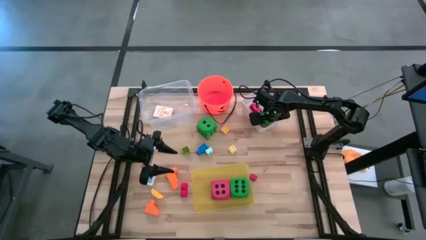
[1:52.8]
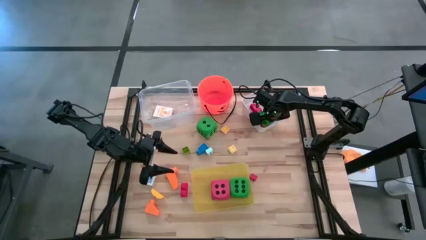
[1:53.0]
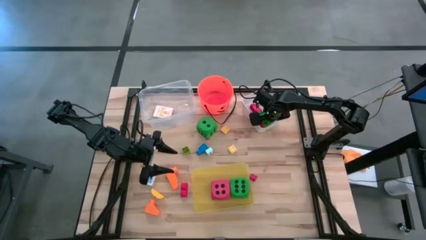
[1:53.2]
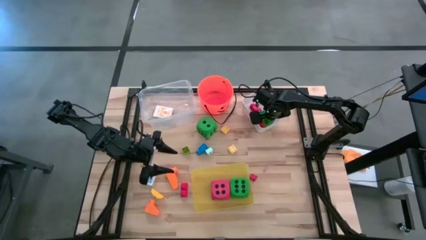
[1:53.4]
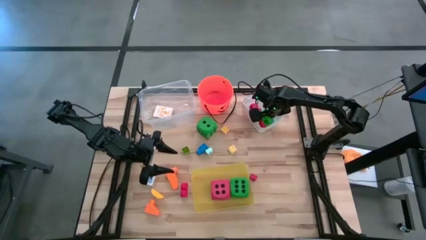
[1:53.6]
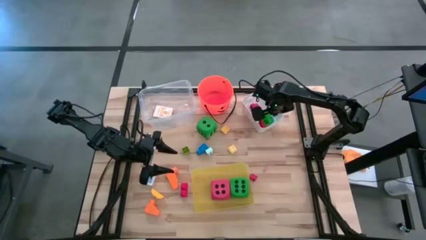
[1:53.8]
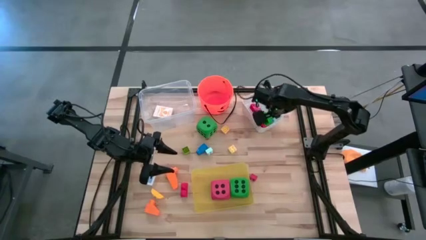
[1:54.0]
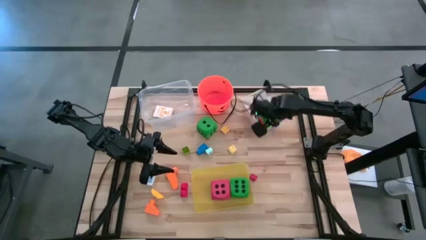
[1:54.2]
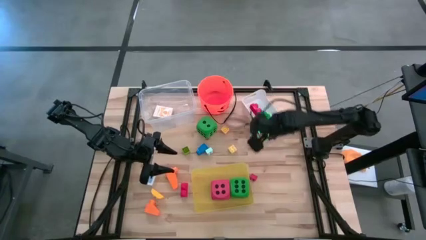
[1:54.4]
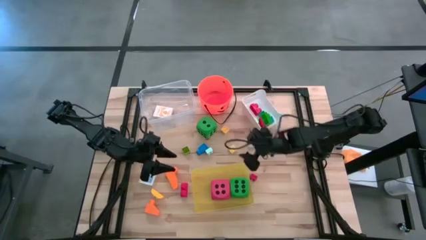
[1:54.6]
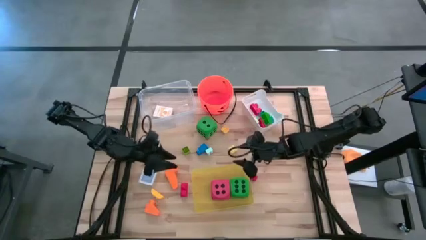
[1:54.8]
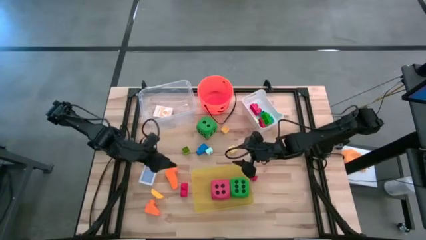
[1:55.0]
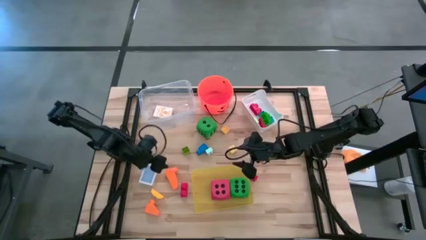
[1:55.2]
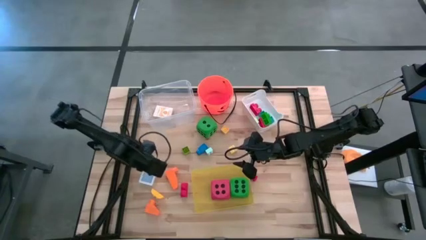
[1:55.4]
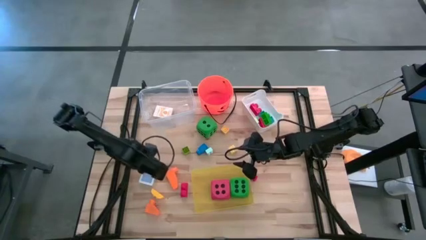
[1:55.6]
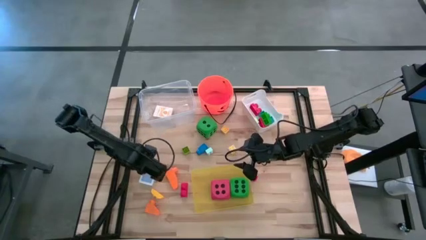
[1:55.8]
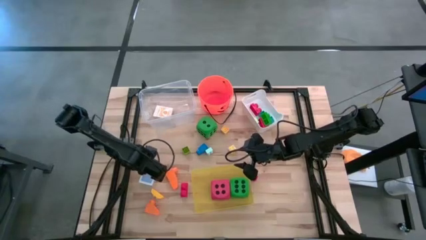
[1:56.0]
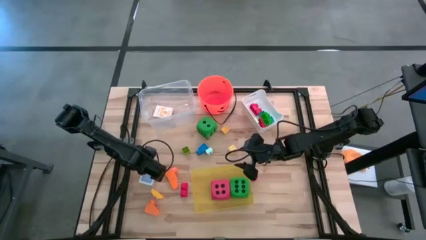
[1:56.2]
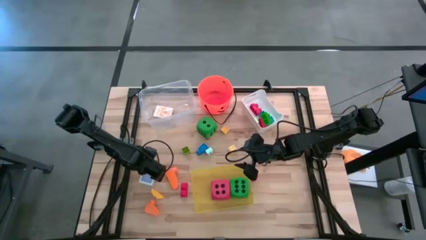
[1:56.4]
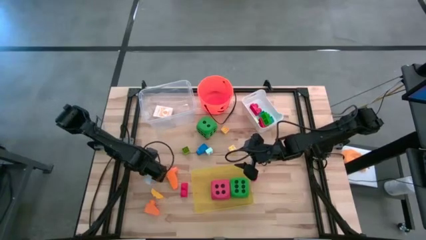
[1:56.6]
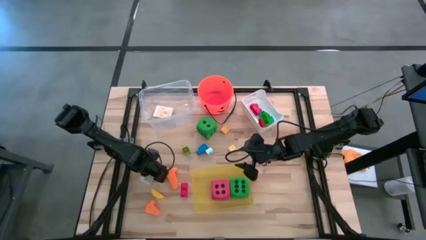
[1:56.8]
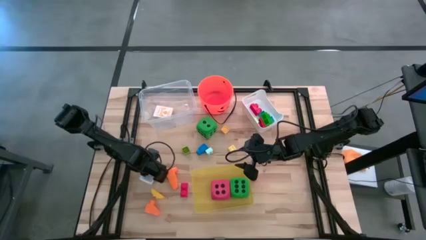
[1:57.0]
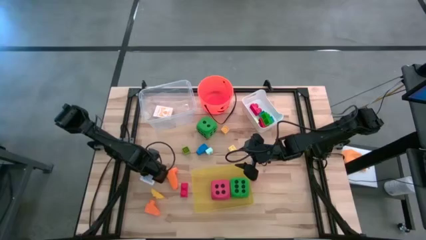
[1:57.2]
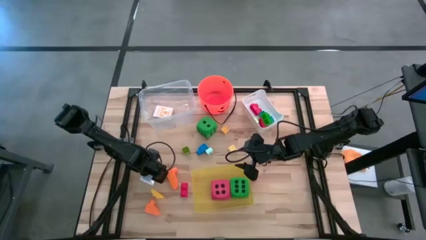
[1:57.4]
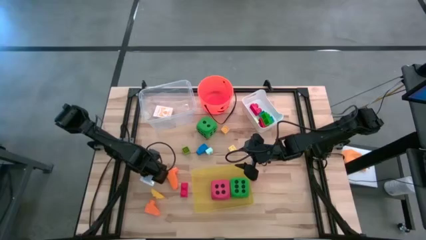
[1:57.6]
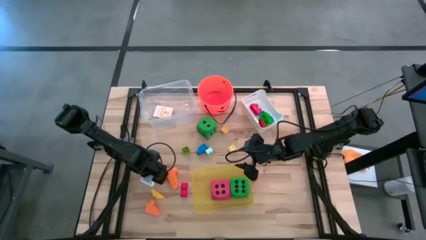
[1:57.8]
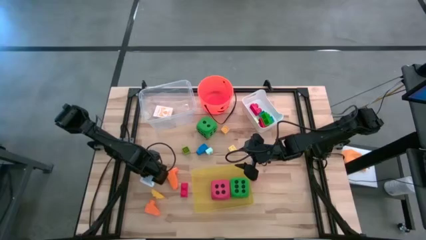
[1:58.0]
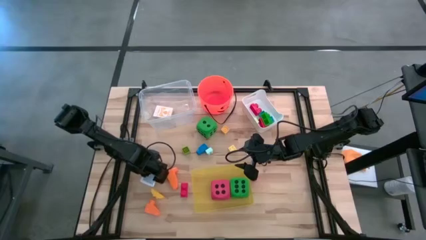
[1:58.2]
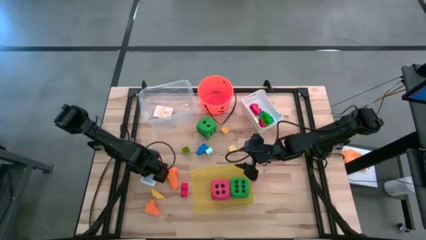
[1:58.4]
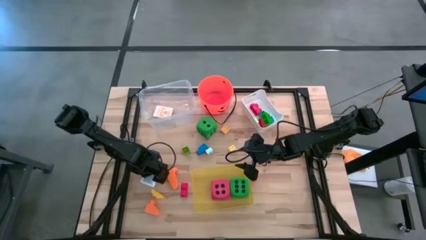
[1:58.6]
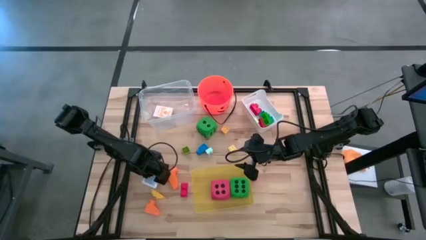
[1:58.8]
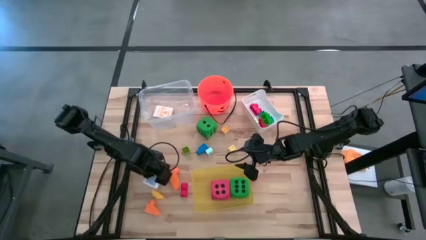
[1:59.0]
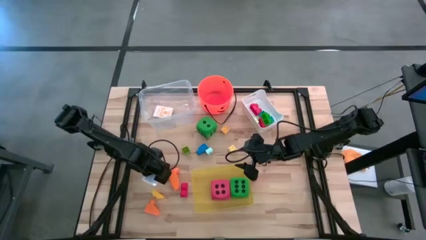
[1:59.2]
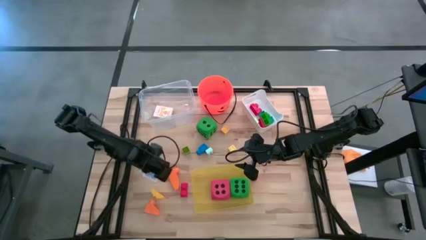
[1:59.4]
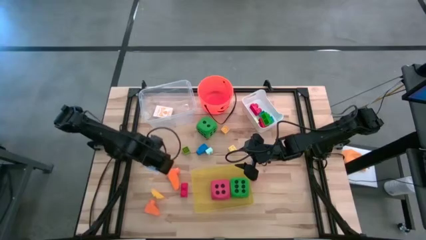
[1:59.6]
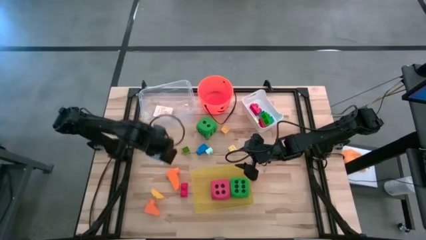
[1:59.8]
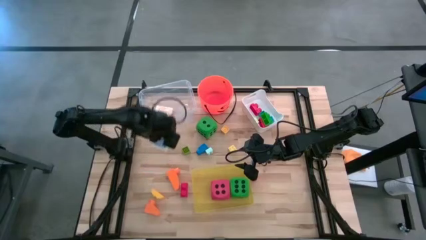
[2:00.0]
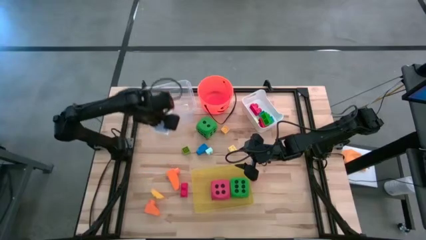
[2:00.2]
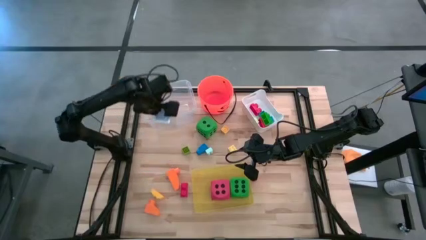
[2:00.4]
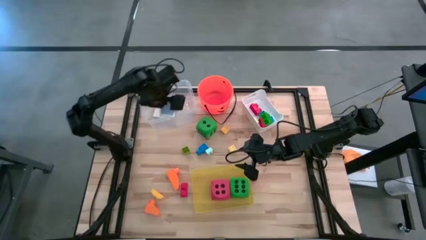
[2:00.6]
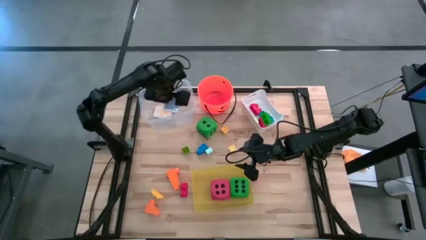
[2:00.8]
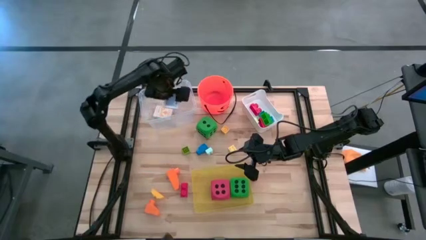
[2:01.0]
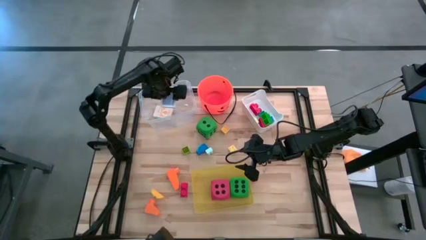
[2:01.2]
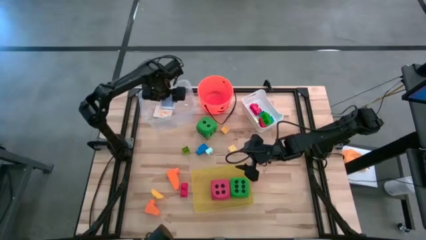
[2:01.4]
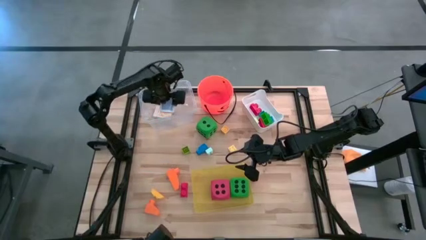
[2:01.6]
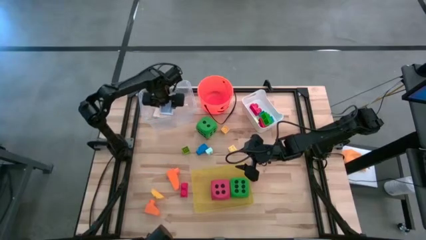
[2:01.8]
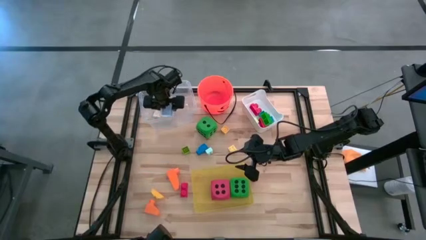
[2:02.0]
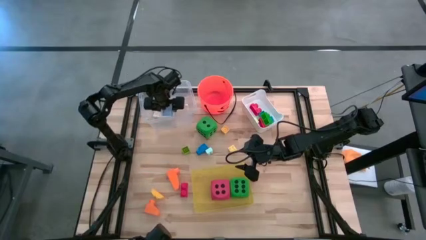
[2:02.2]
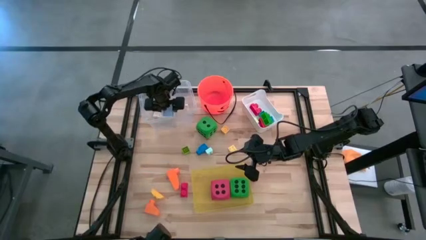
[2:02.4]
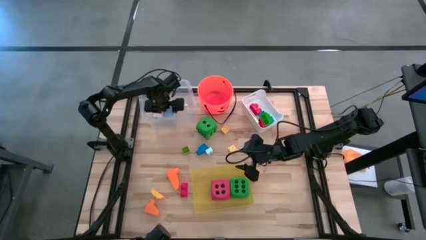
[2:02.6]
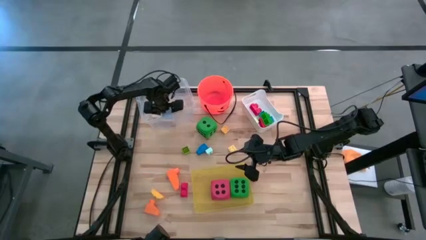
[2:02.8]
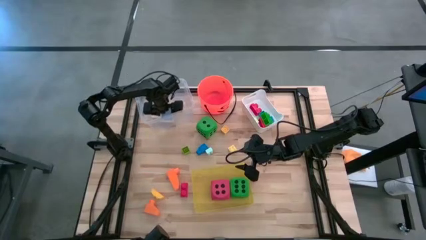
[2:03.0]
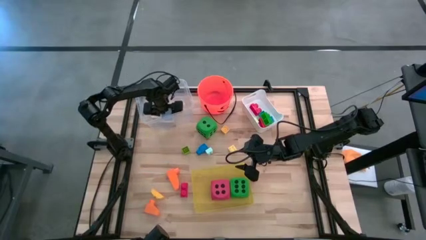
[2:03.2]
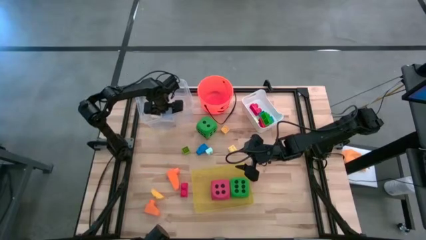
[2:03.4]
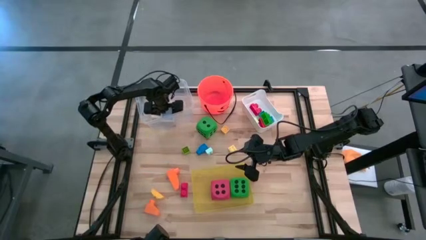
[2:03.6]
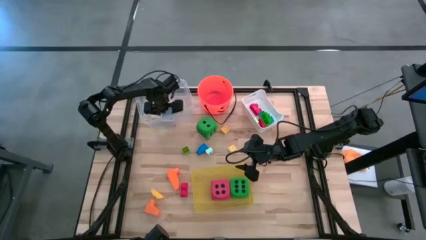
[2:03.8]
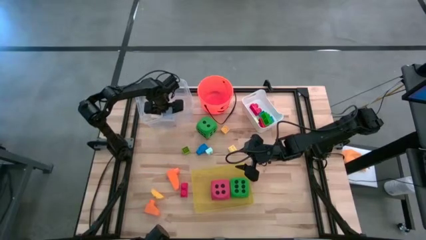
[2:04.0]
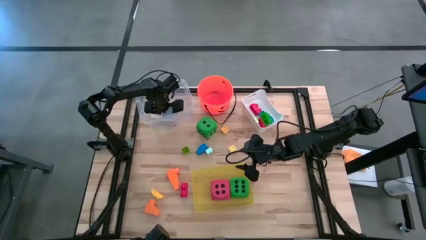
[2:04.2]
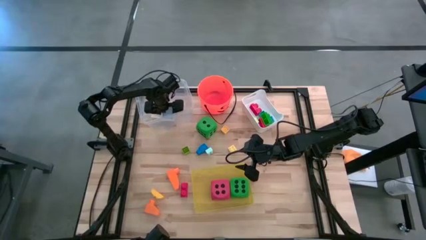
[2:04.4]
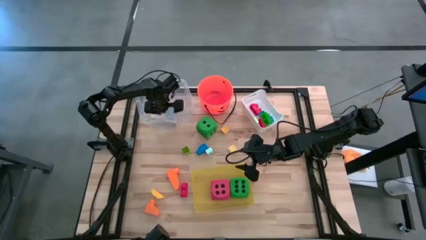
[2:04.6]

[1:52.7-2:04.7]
Task: Pick & Place Toys
Put the blue playing card box into the transparent bin

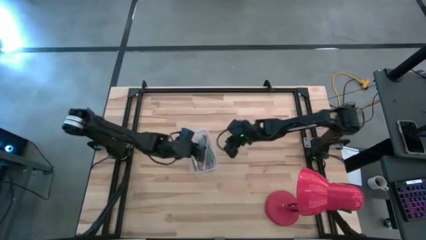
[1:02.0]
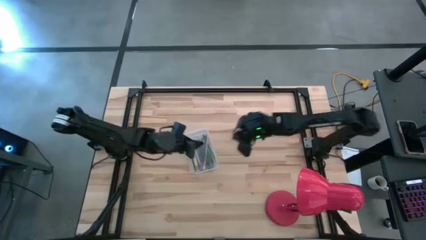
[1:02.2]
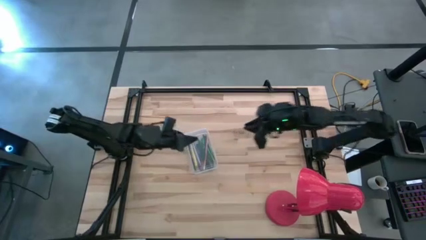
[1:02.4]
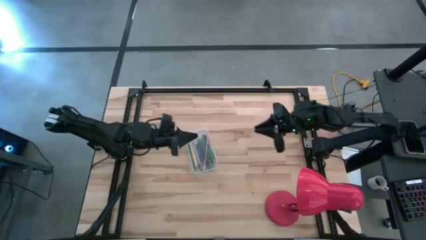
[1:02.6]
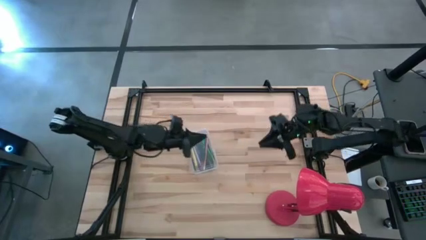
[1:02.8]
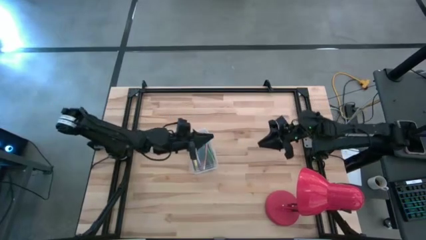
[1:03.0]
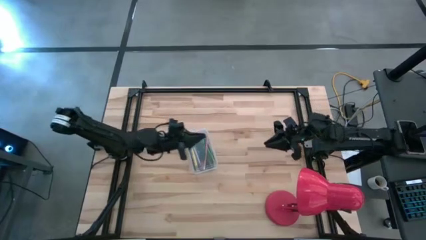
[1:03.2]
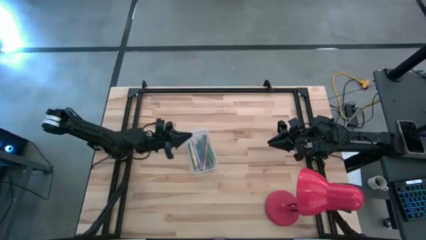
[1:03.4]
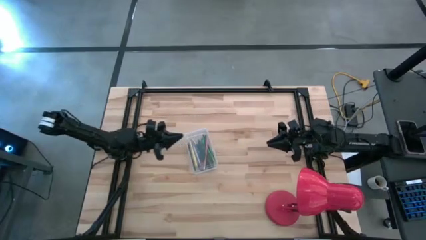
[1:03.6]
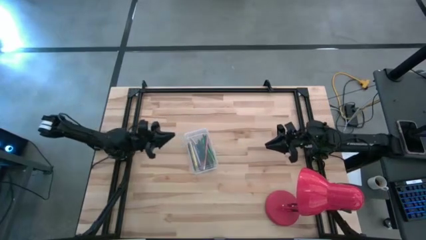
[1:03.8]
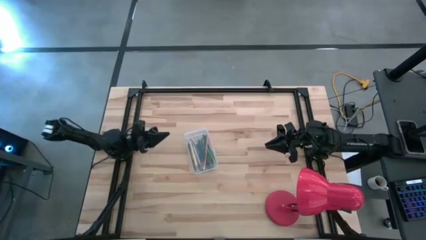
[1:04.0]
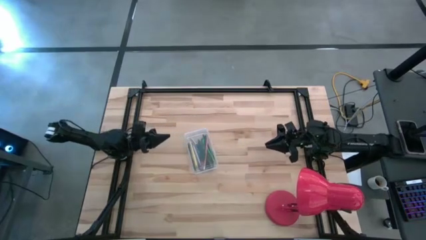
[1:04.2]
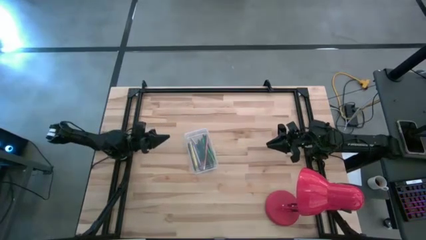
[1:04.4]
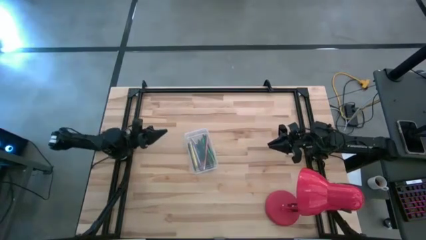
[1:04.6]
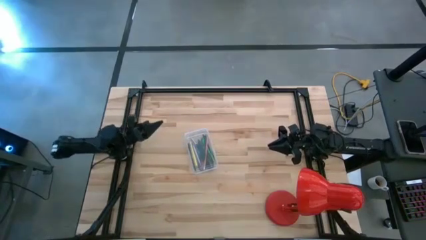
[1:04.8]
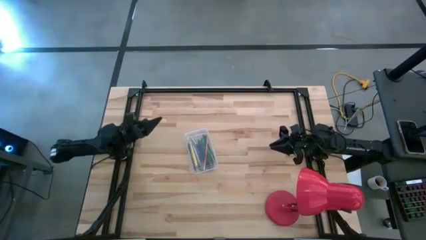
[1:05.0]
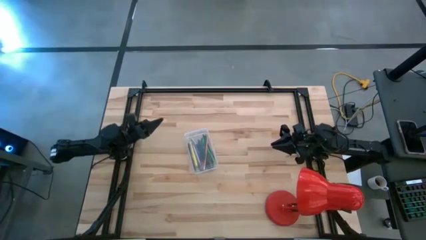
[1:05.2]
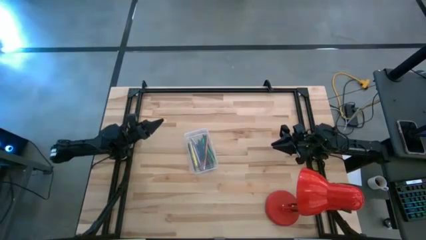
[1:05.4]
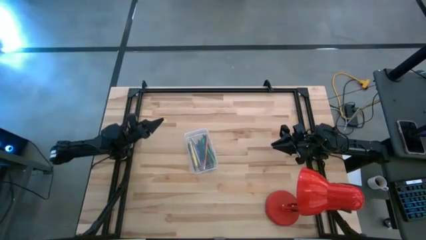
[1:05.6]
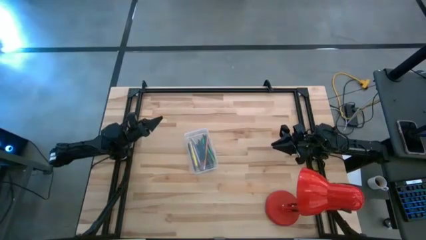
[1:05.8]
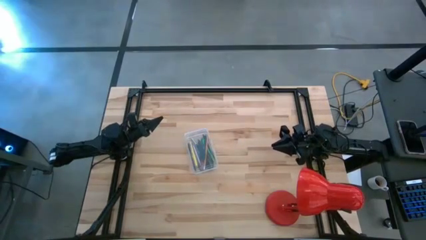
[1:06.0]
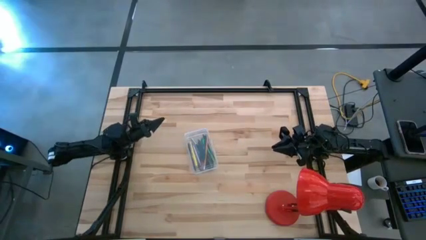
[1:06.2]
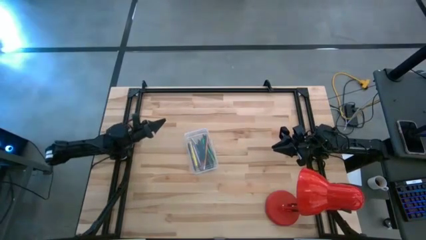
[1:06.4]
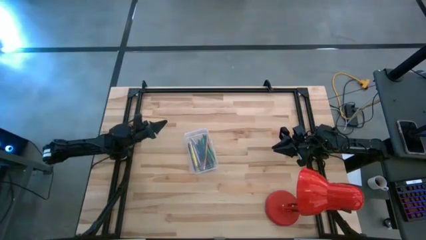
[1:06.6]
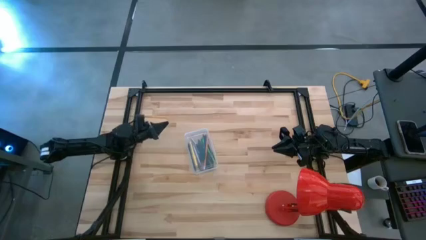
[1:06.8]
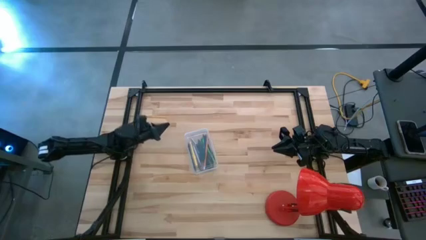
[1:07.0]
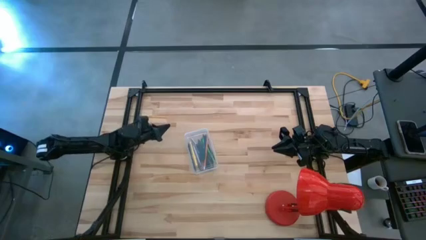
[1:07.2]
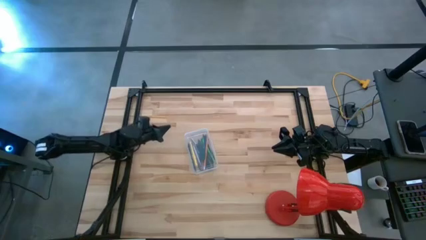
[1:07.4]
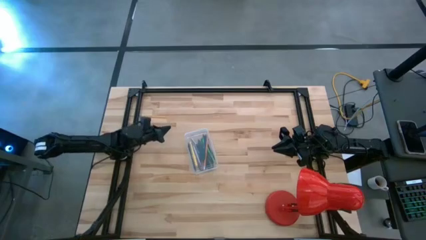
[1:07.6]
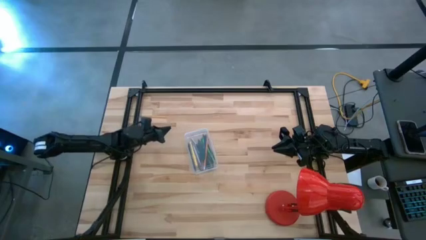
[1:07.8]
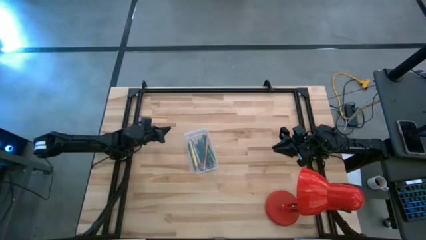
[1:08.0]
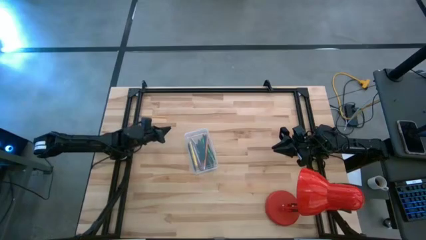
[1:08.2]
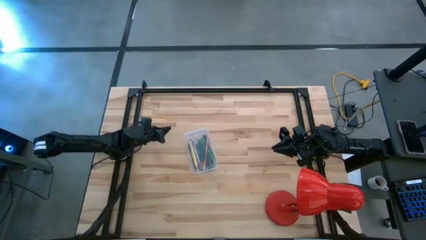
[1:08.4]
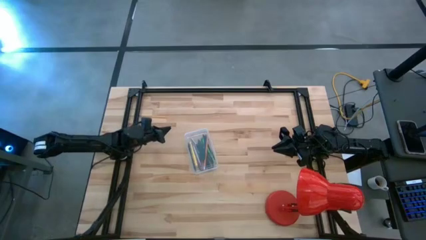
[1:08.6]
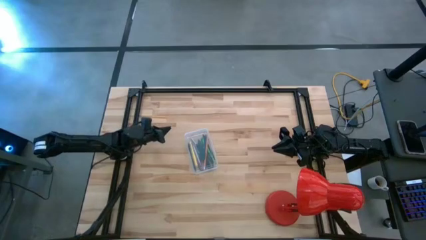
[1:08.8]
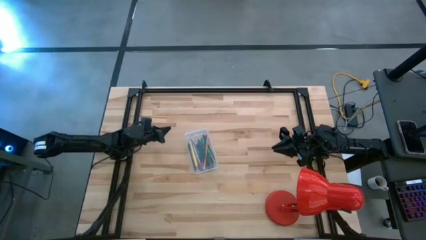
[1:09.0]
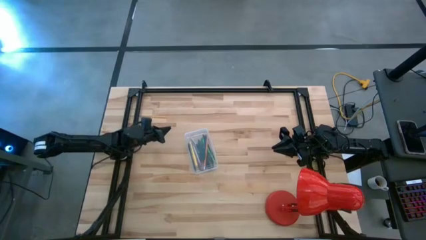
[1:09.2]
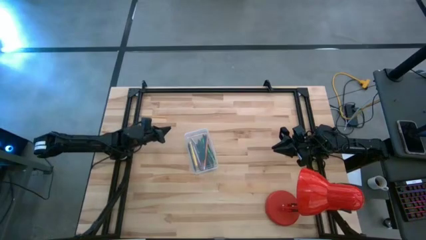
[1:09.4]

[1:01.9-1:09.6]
Task: Pick & place school supplies into a supply box
Return to Home Position
